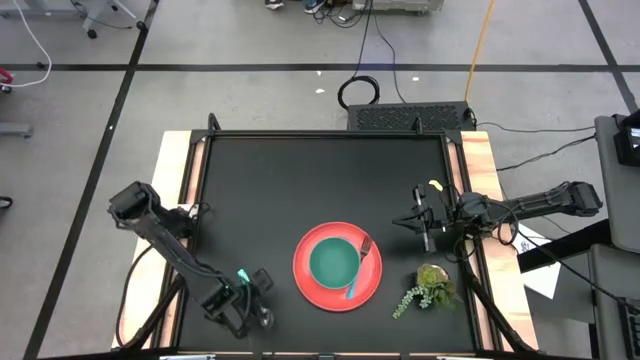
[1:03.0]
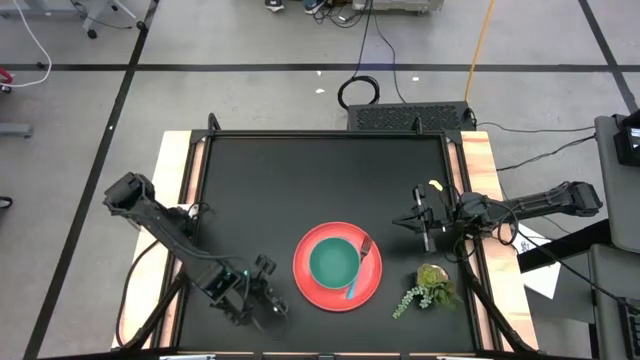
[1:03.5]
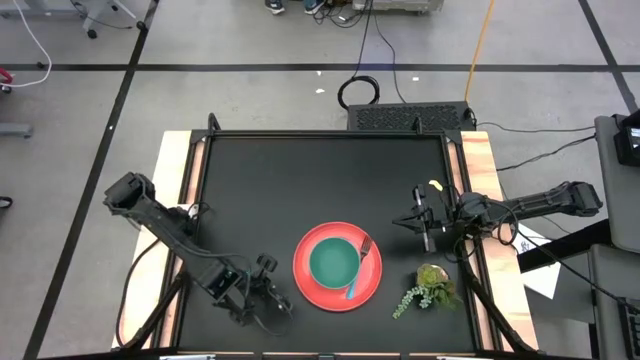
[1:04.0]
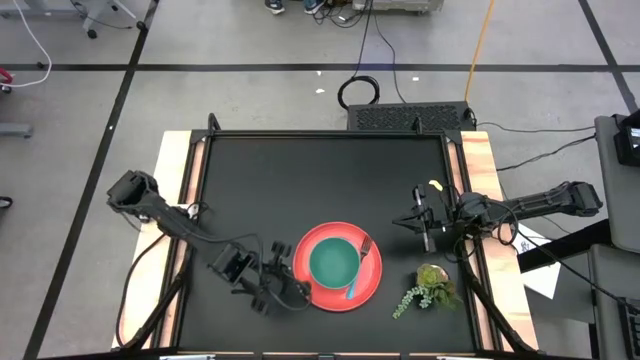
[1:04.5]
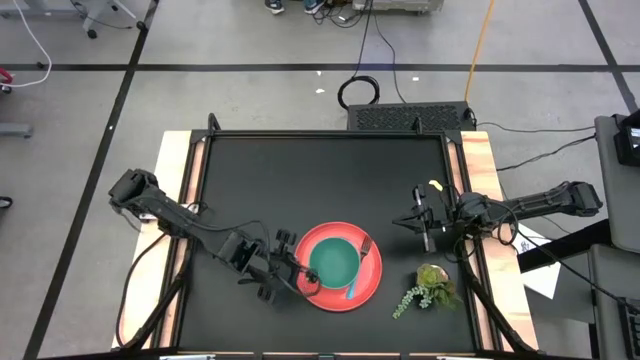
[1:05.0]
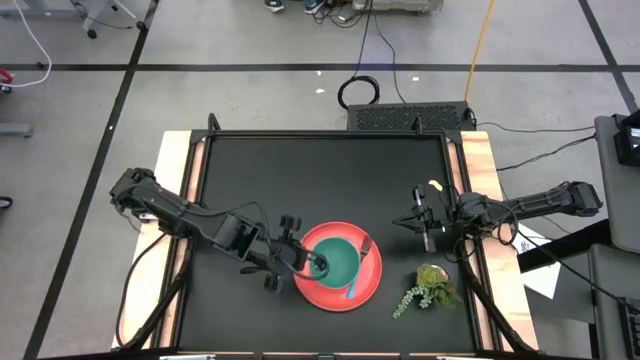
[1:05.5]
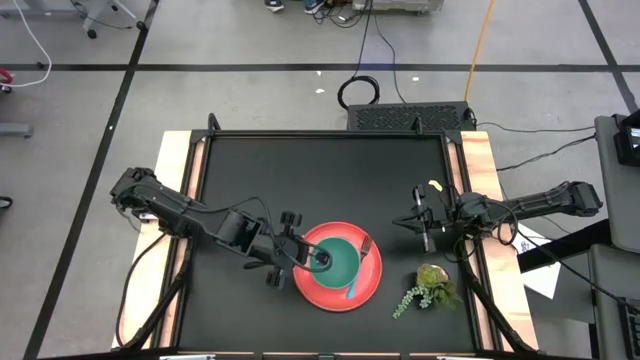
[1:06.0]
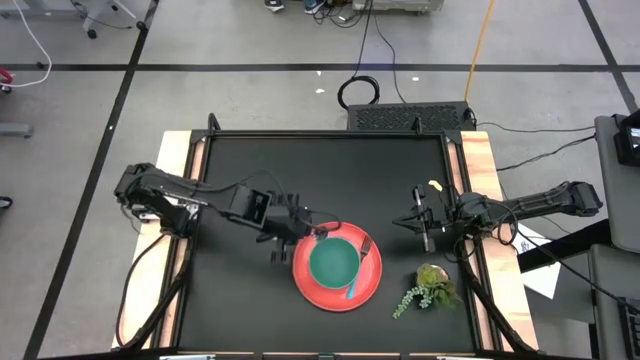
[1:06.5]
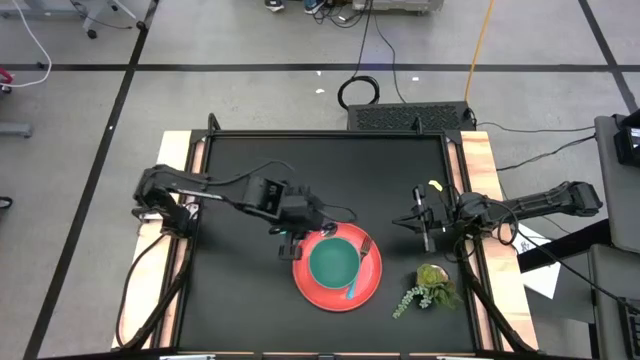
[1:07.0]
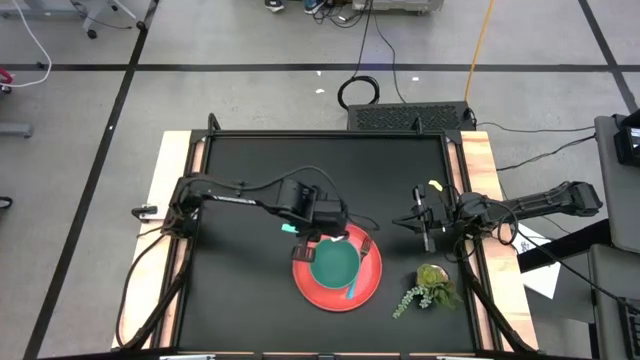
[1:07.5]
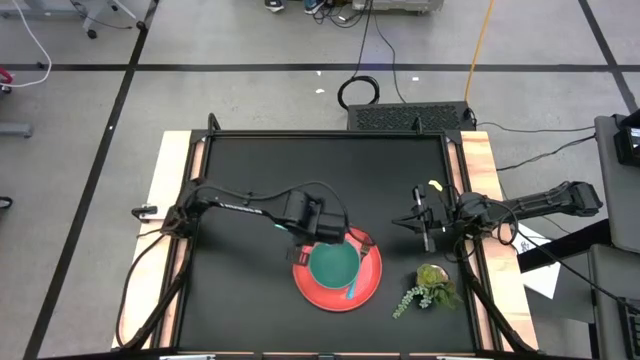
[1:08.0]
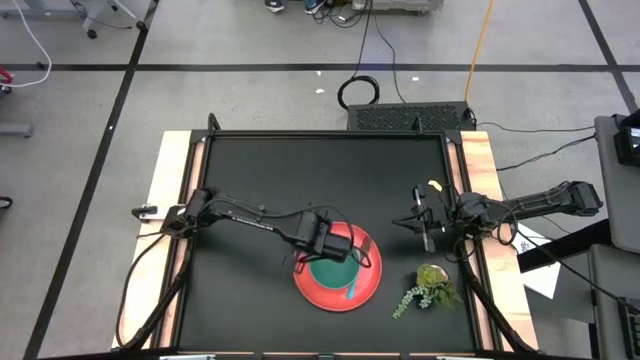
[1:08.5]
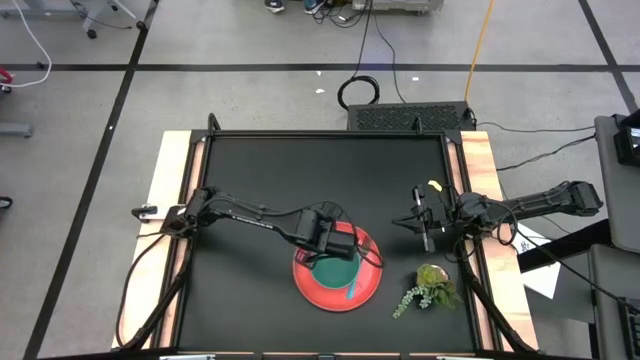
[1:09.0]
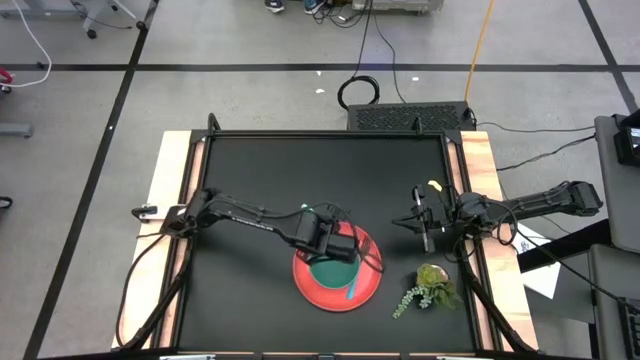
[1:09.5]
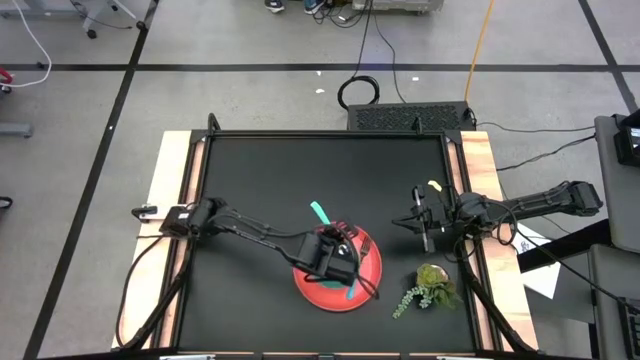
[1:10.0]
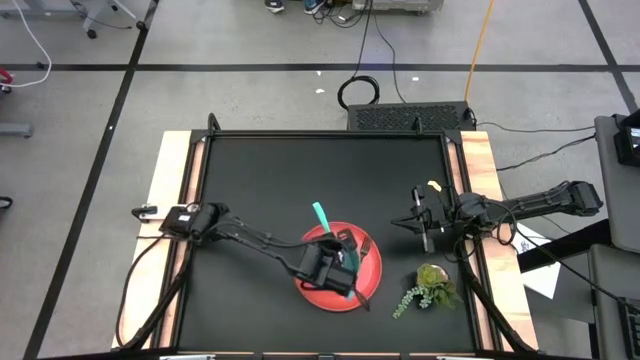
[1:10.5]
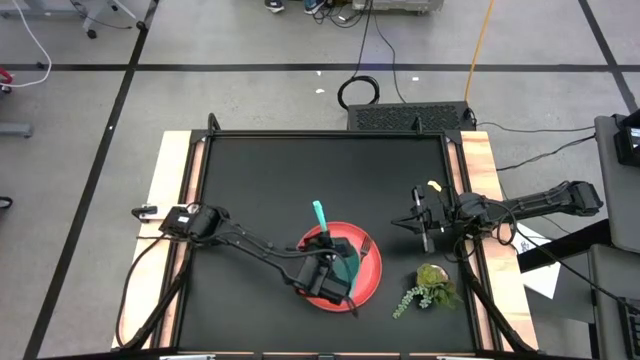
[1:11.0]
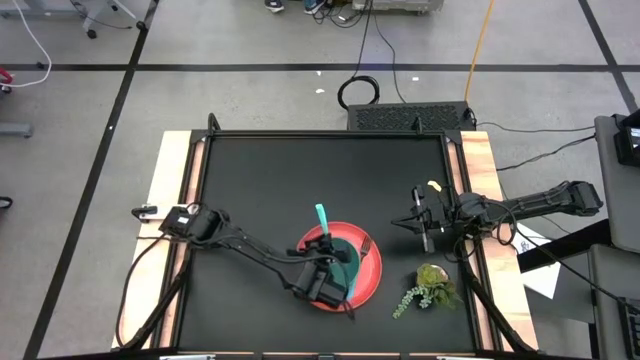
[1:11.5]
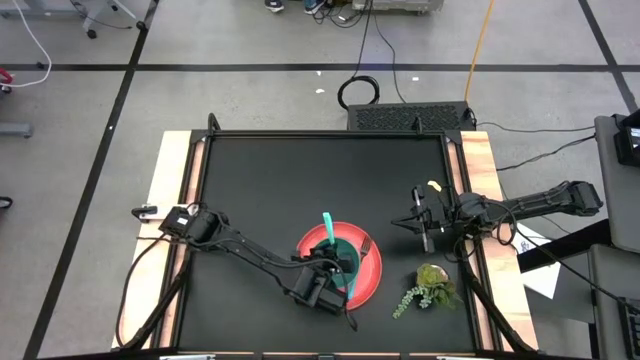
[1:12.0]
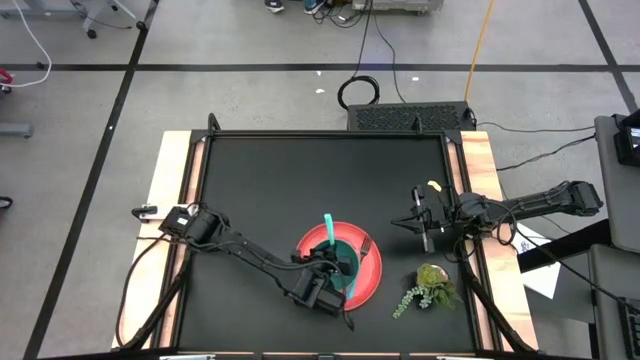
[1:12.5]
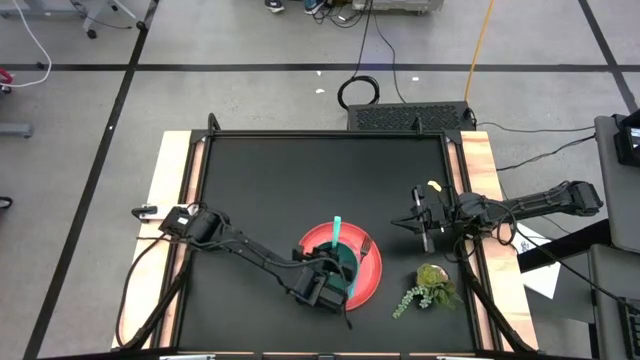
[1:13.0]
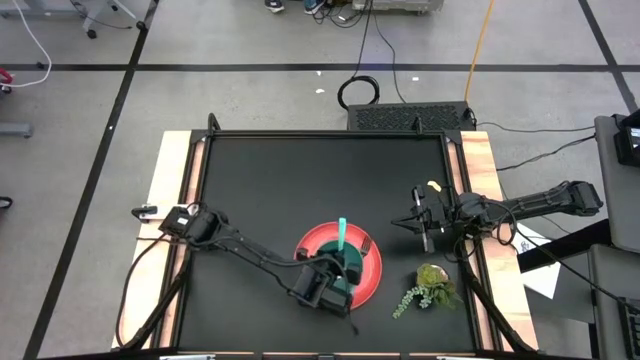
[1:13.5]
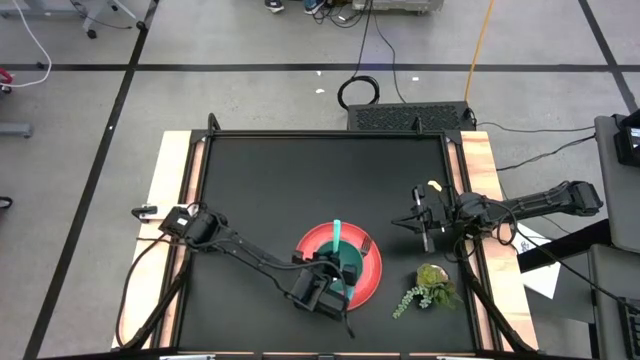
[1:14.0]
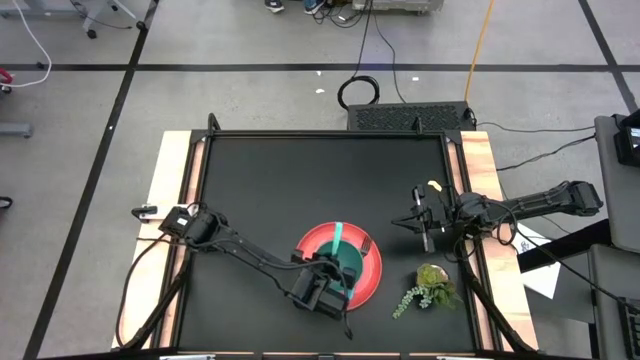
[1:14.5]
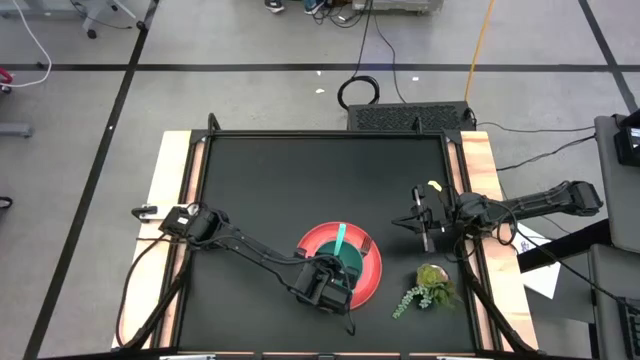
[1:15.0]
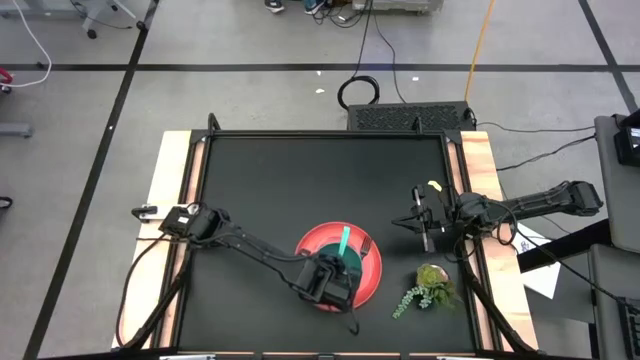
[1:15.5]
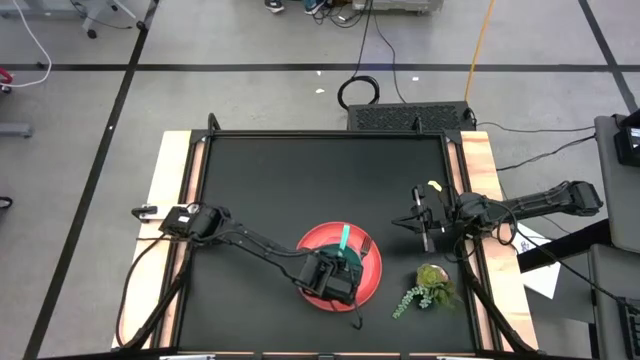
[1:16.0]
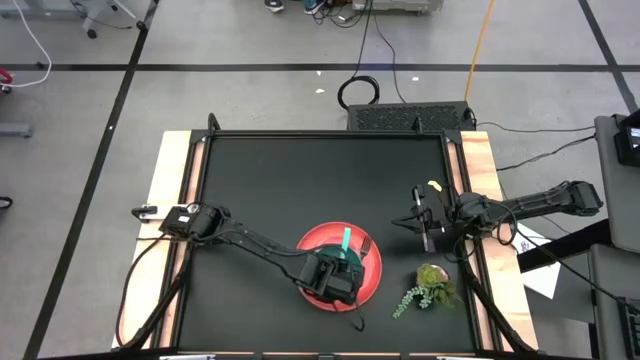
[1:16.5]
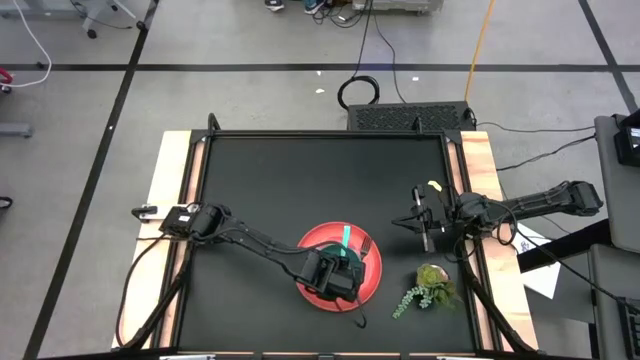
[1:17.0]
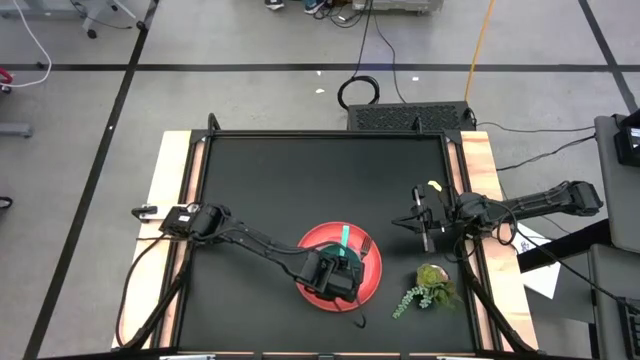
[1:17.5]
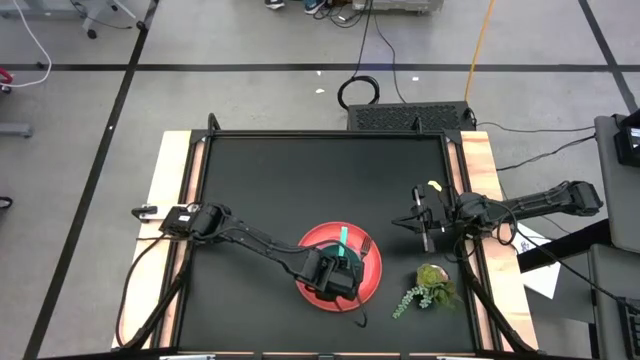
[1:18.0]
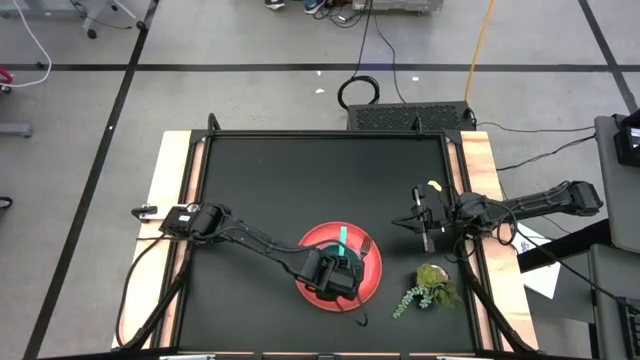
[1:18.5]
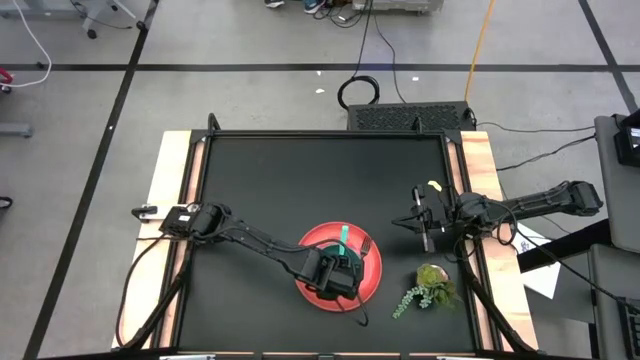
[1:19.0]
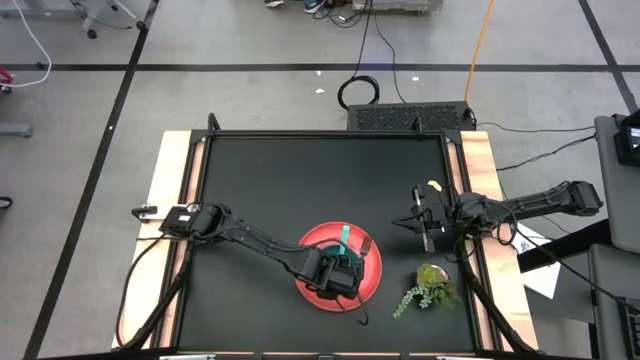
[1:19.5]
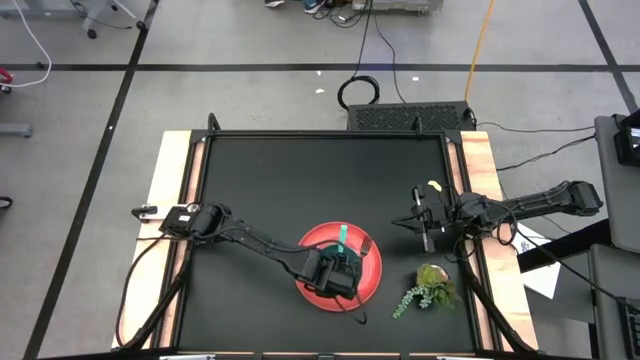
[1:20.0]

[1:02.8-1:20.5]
Task: Set table place
Put the green spoon into the green bowl on the orange plate

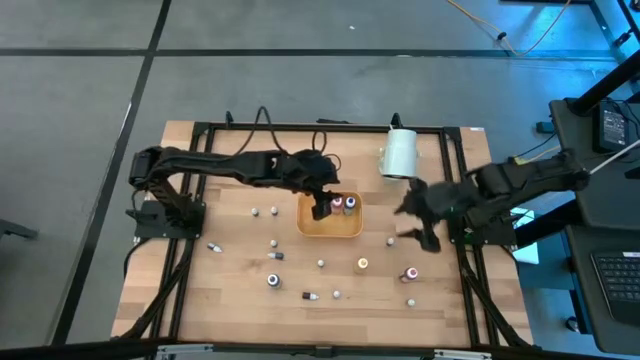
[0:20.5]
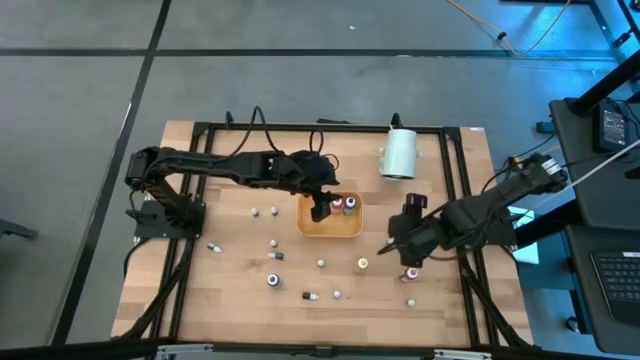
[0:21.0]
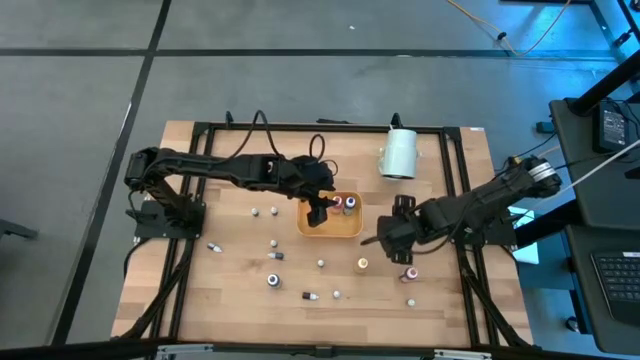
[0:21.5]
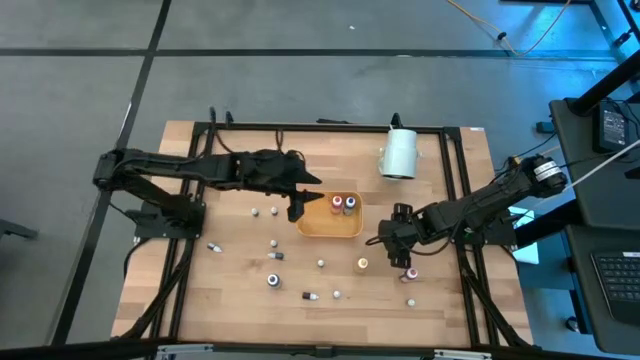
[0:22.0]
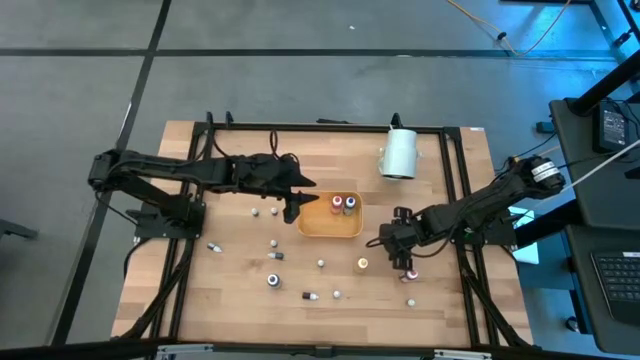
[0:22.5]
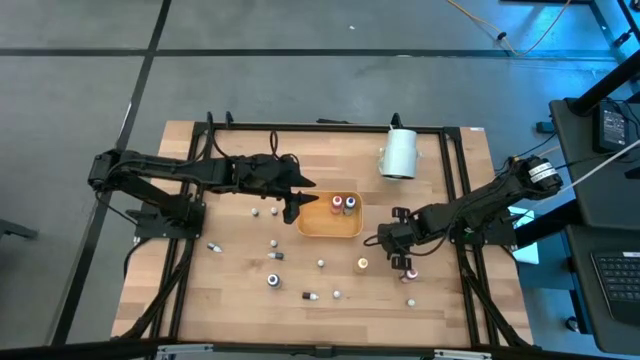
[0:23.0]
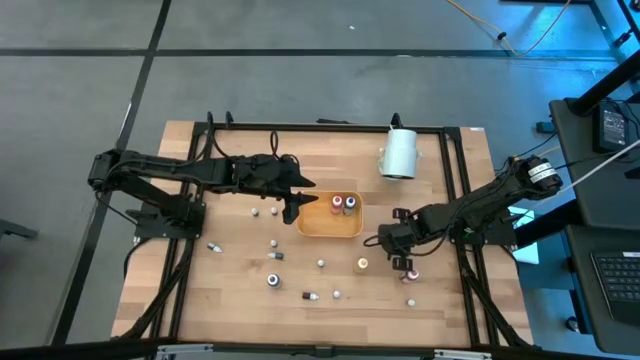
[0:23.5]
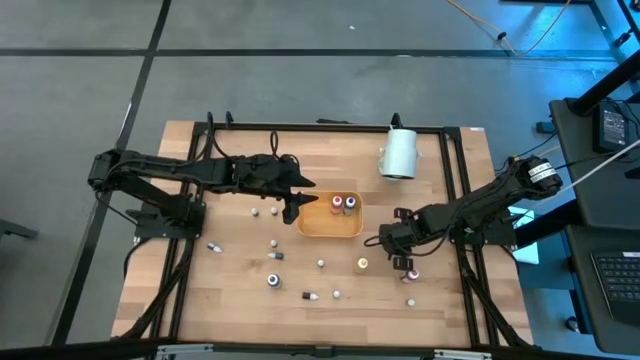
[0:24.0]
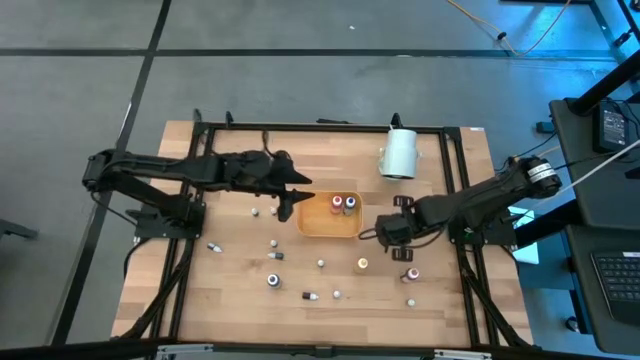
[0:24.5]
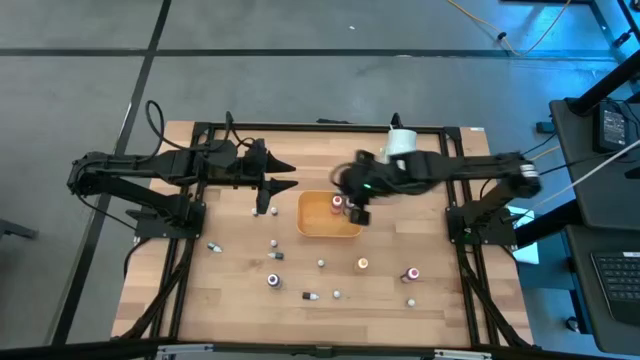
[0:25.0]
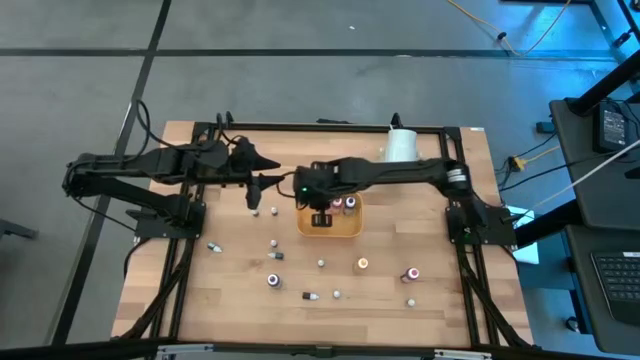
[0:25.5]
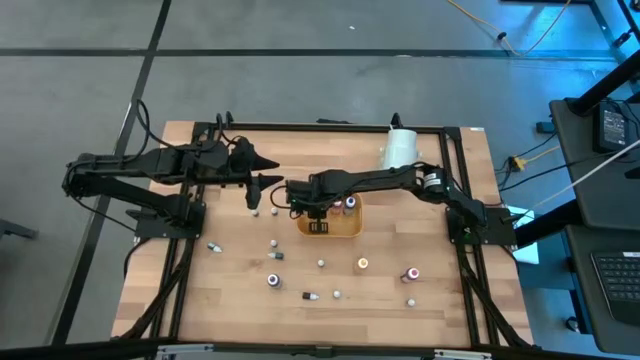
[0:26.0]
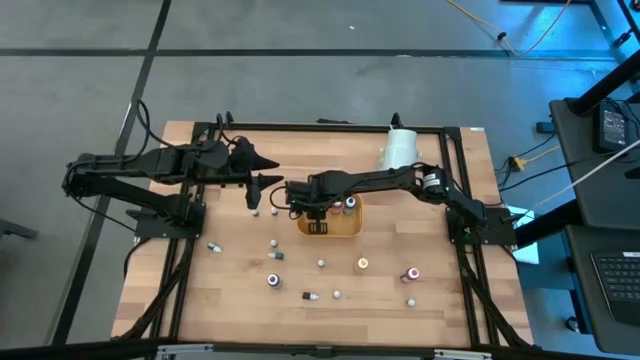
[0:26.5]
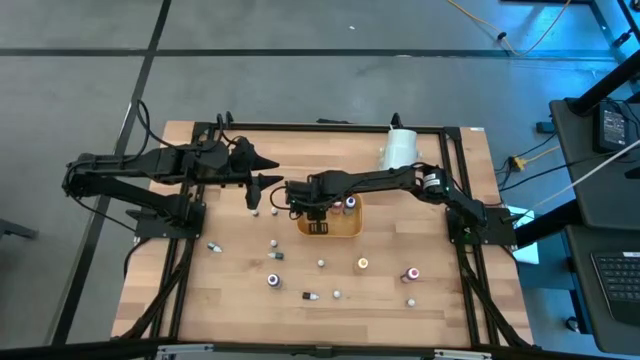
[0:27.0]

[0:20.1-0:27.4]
Task: Pick & Place food coloring
Put the right small black food coloring bottle into the yellow bin
